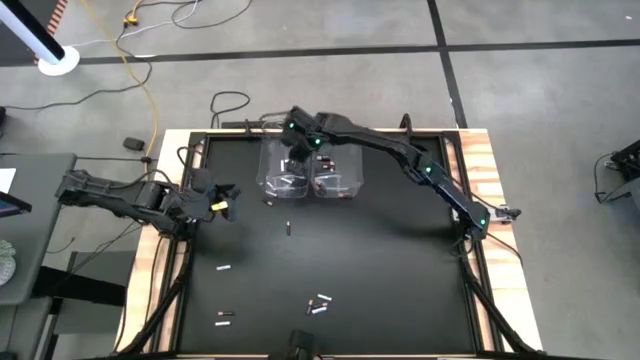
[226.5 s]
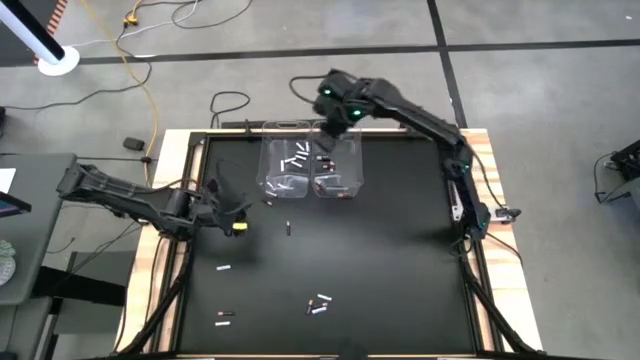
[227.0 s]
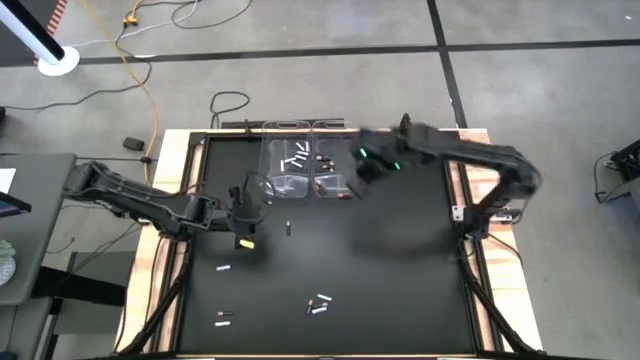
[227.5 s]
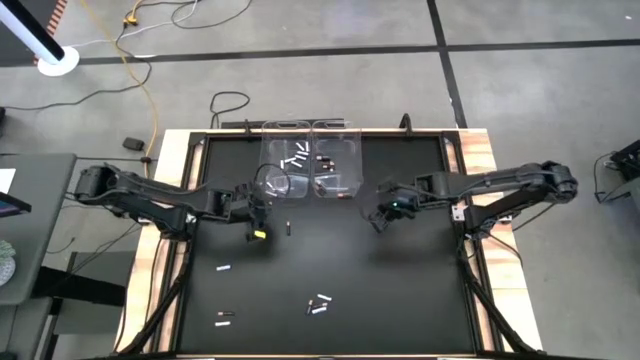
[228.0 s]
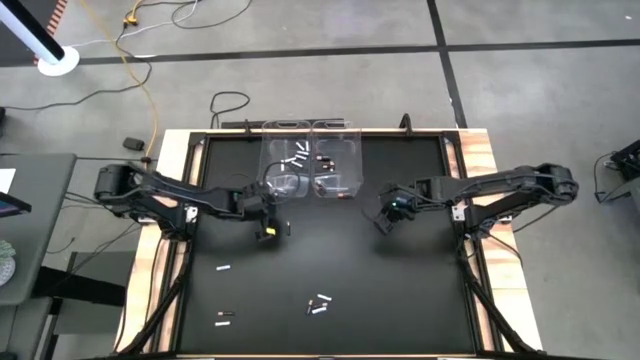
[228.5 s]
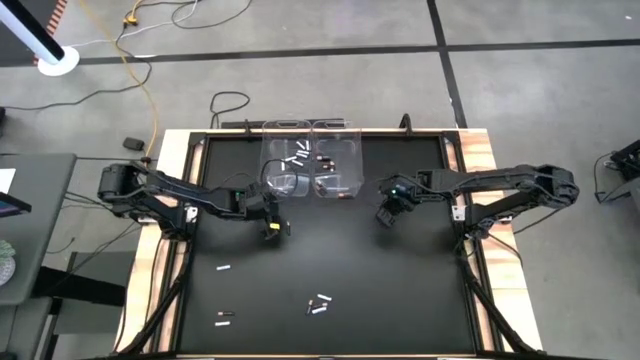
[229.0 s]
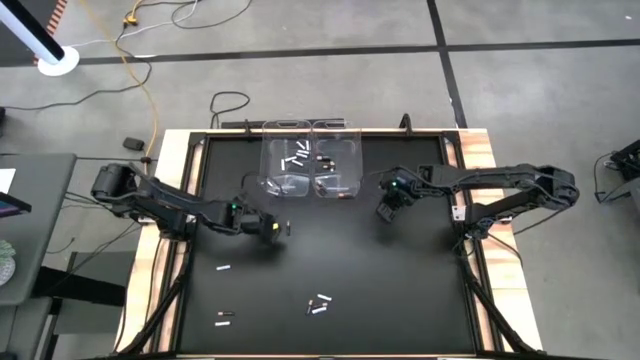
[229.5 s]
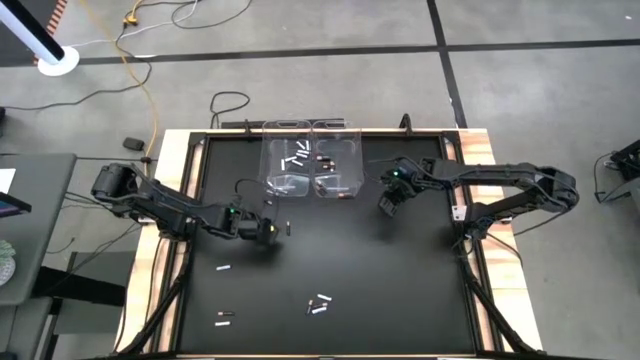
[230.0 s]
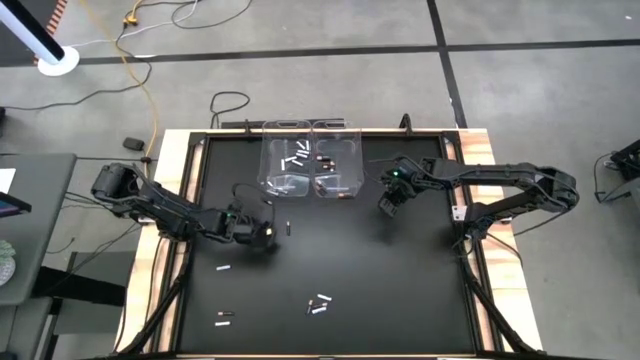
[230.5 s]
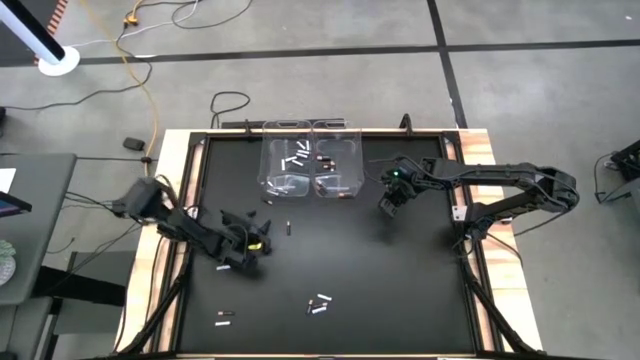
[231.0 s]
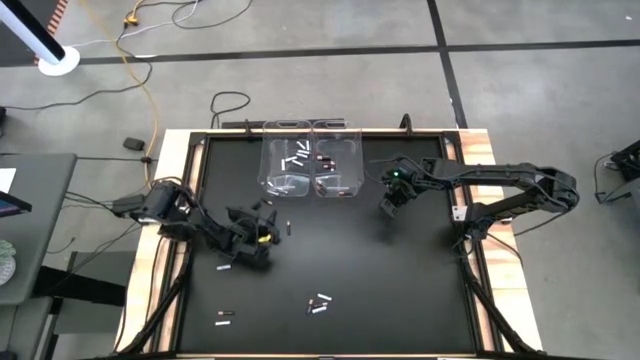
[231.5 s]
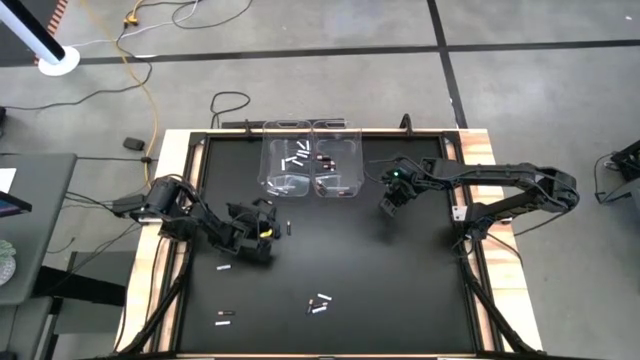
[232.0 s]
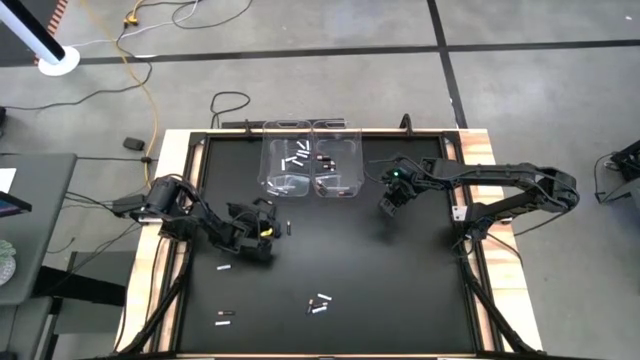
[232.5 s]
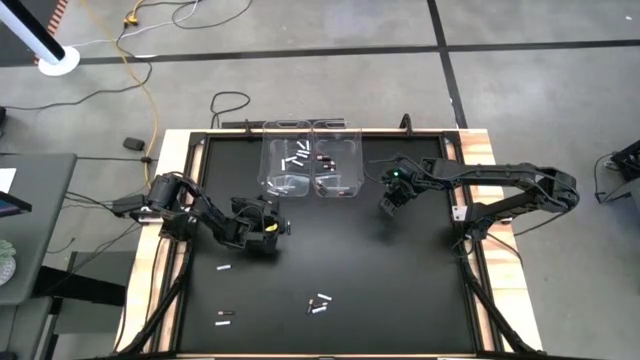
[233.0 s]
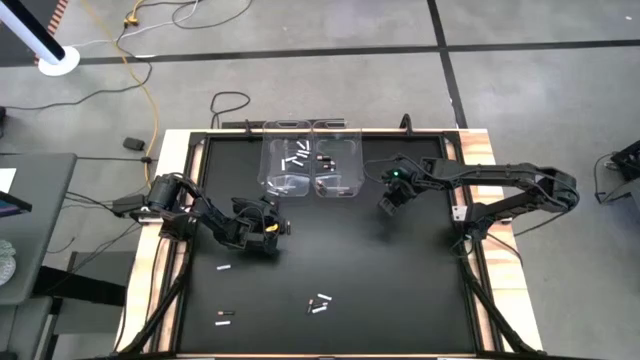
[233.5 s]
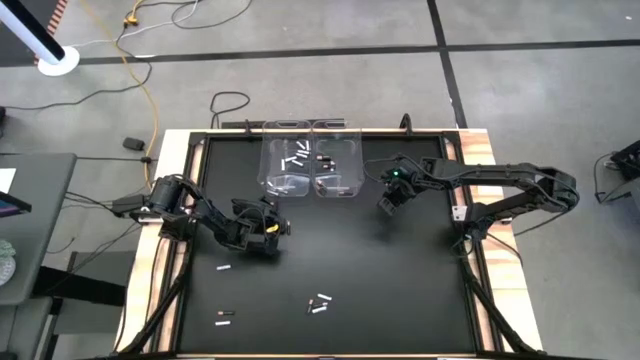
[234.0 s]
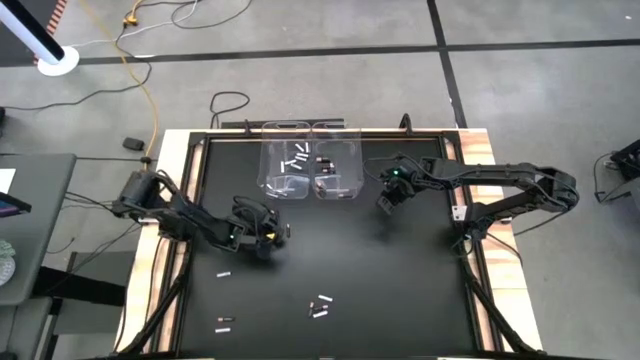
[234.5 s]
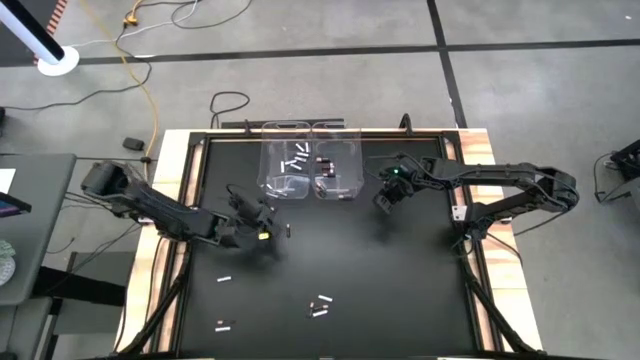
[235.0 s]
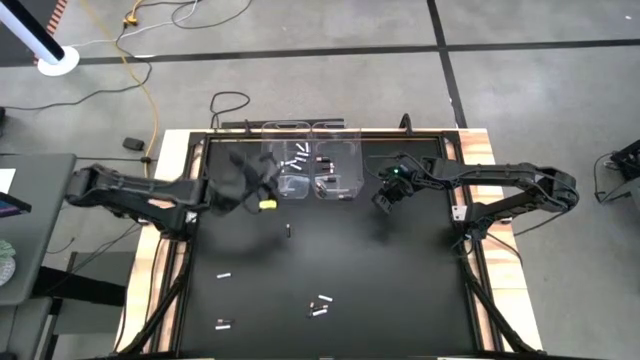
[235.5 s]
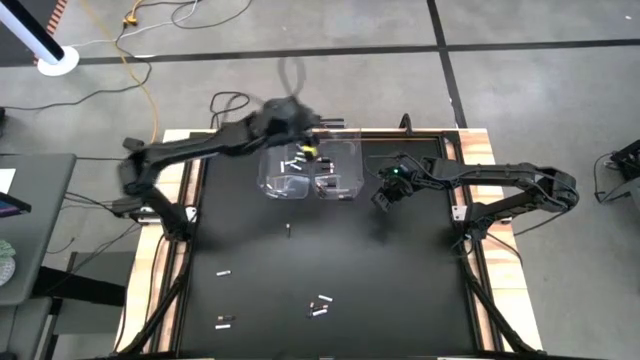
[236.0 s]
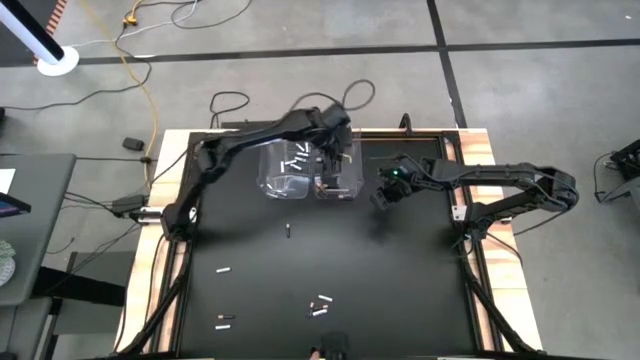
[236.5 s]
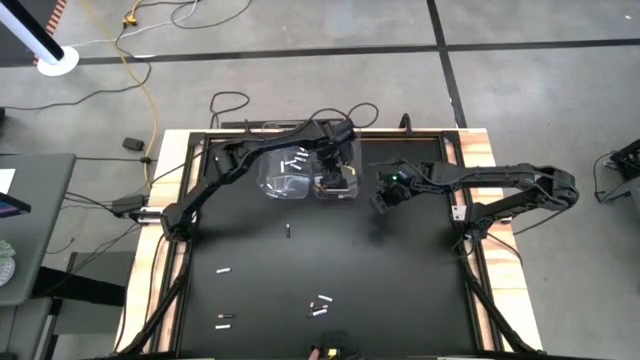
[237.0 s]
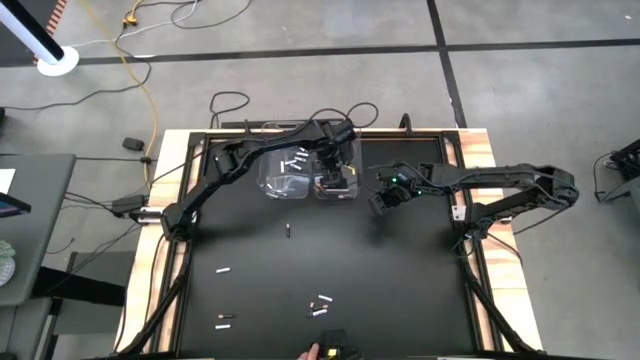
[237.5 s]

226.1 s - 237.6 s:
Task: Sort batteries
Put the black battery into the right transparent bin

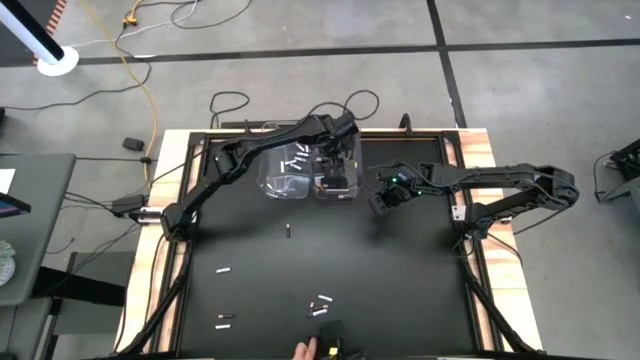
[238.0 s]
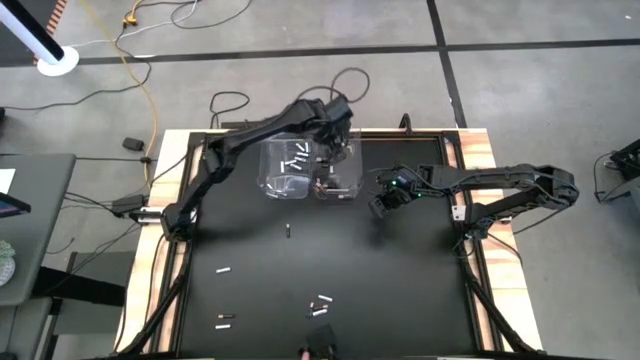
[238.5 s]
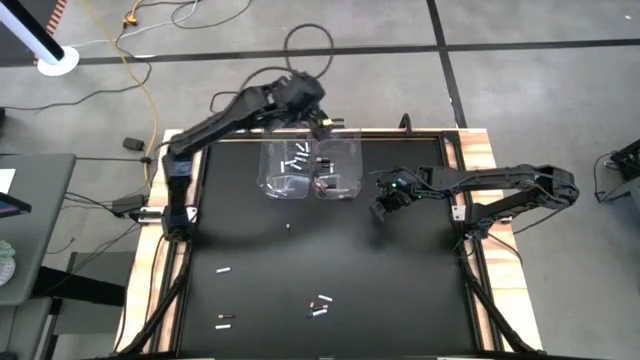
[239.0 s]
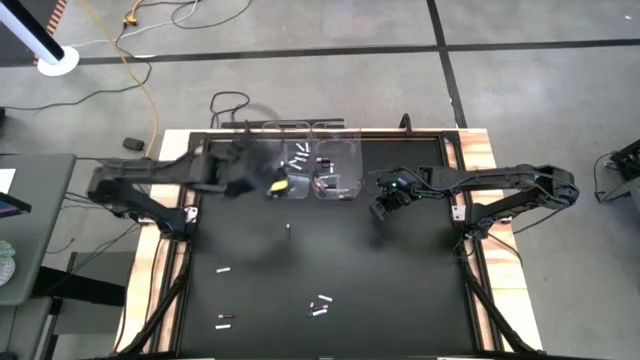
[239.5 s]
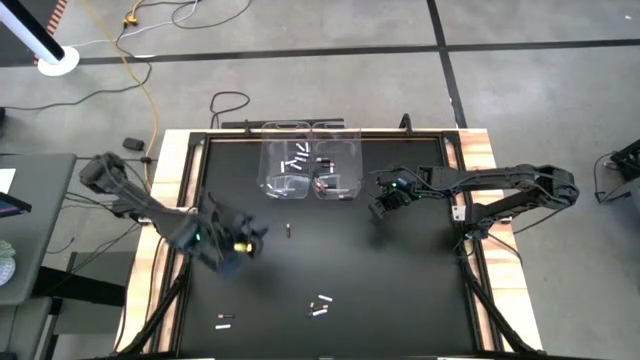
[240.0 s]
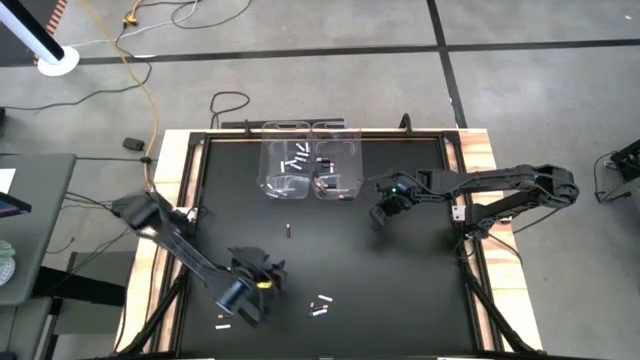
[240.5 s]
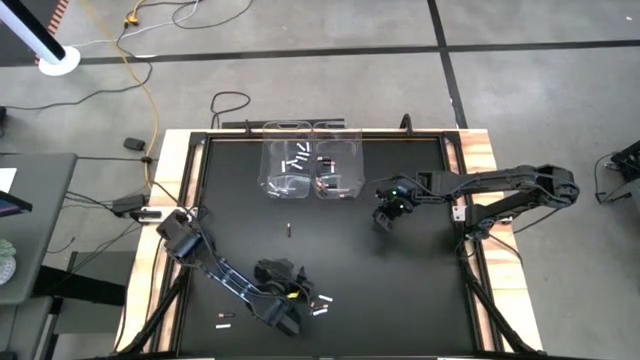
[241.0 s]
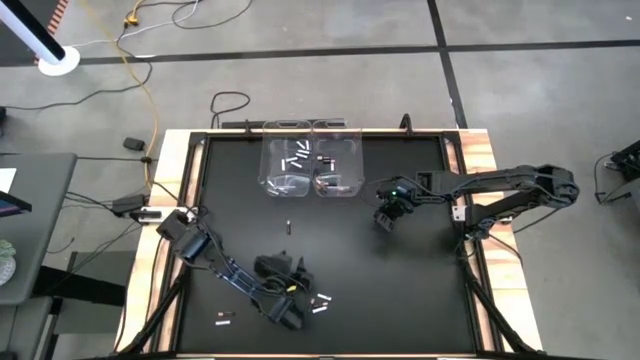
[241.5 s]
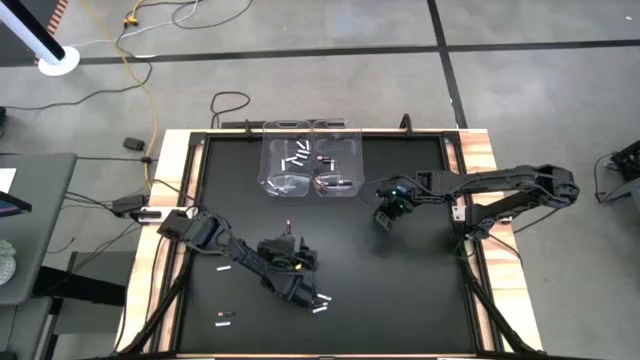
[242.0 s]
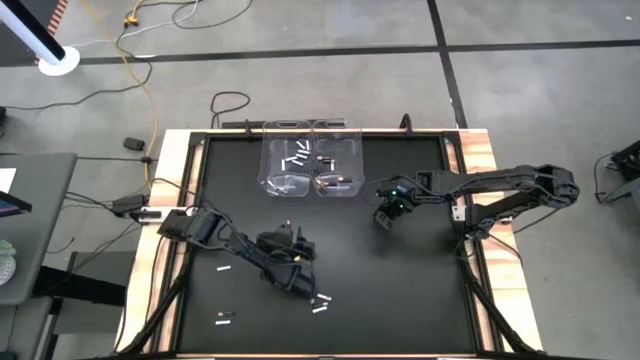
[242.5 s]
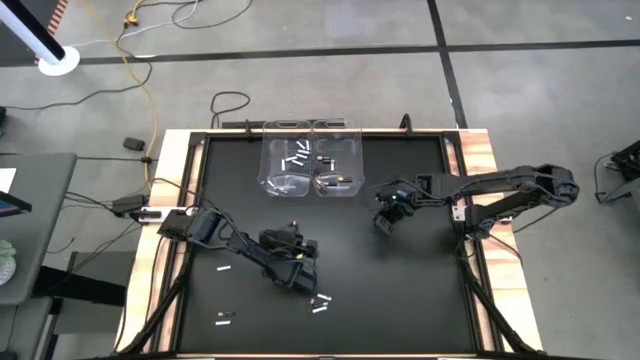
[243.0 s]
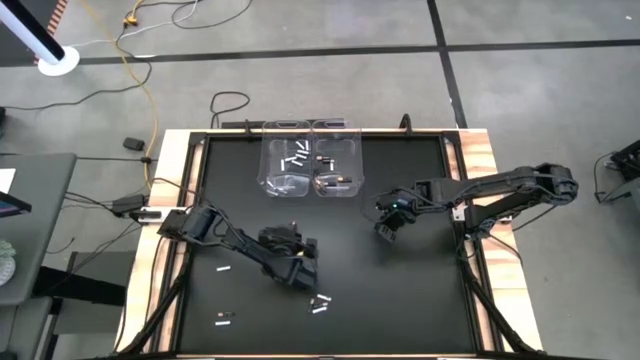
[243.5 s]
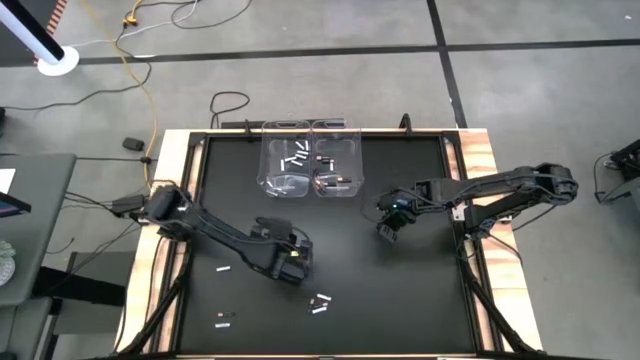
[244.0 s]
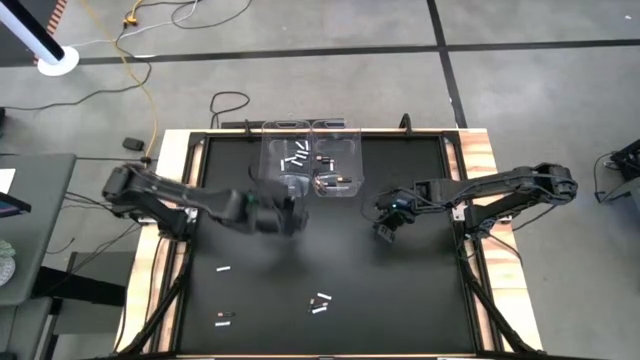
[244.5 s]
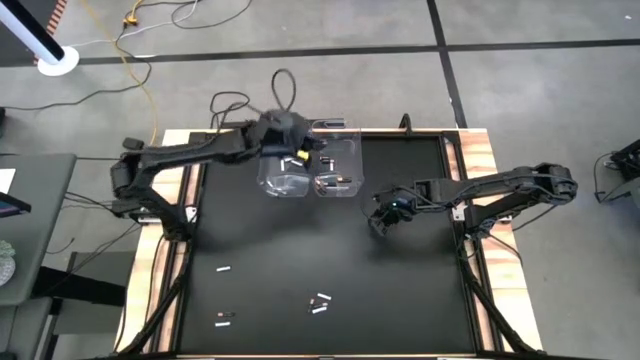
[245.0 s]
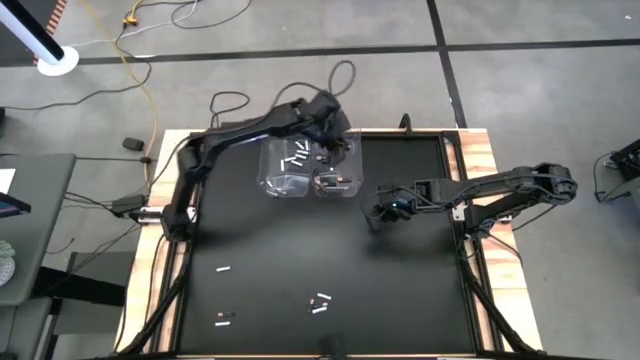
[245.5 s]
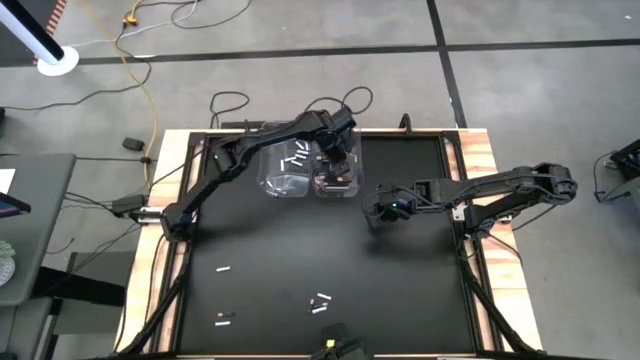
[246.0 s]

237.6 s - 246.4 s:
Put the black battery into the right transparent bin

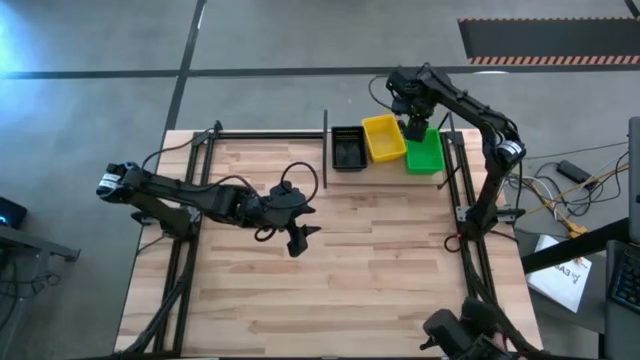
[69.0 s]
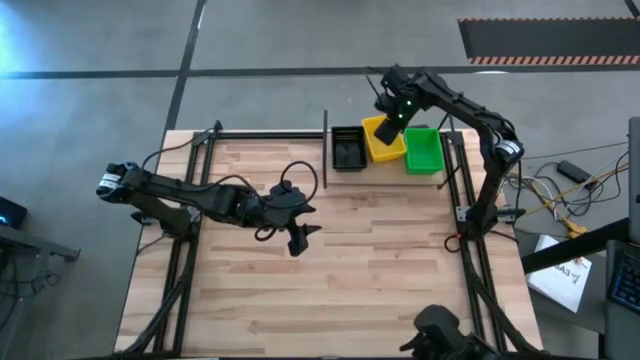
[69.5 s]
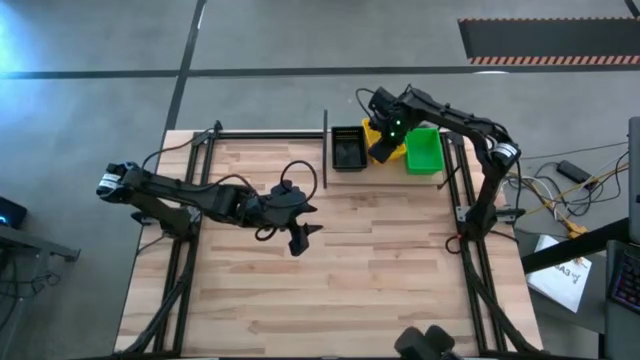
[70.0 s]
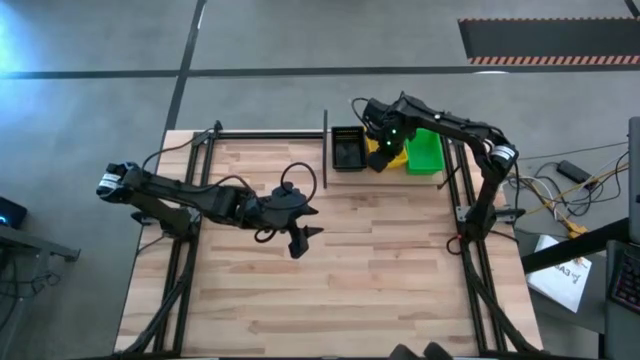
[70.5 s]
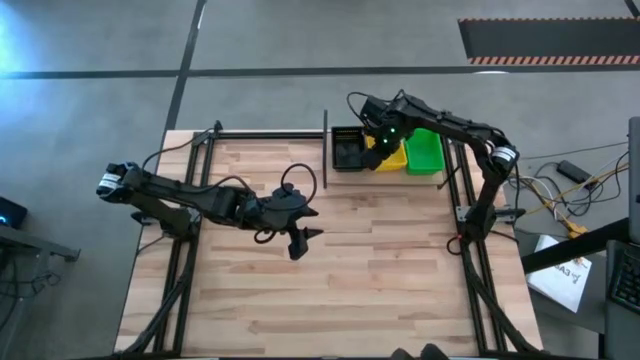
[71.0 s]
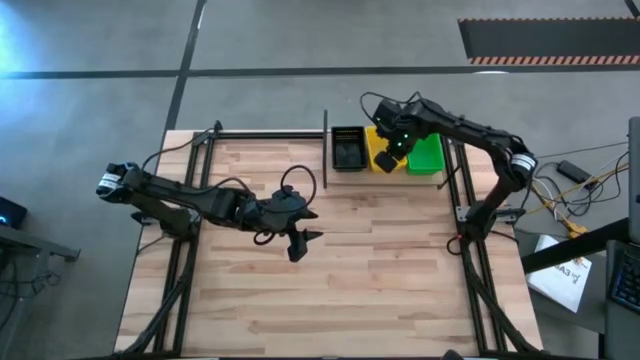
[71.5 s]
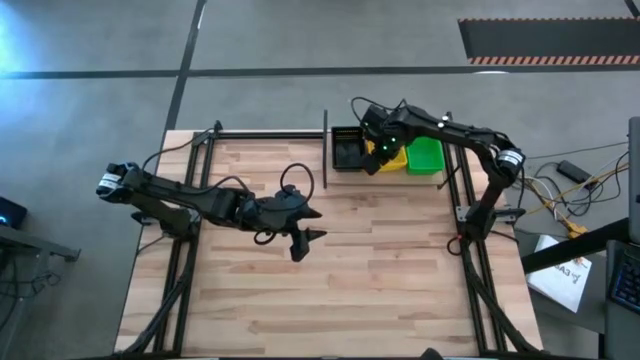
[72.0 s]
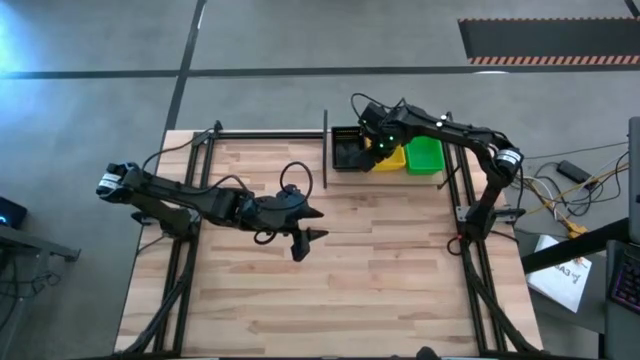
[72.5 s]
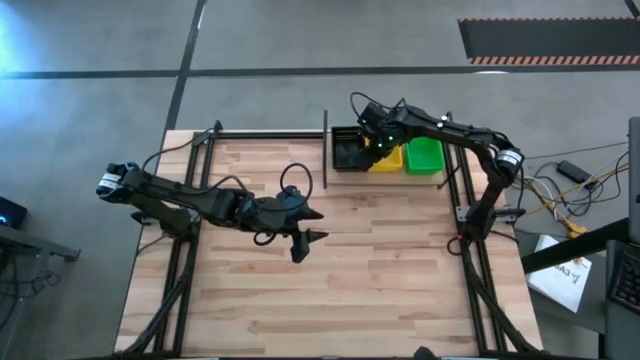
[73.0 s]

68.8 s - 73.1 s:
Task: Stack baskets on shelf by color
Adjust the stacked yellow bins on the shelf
